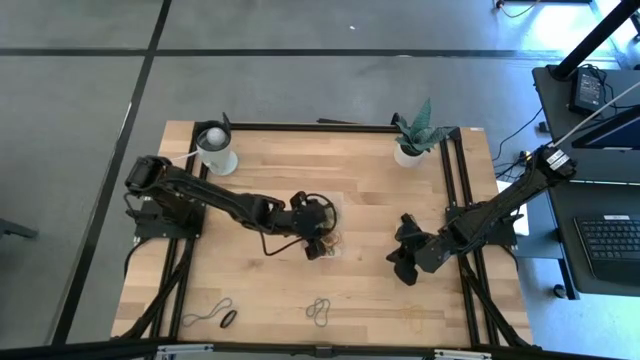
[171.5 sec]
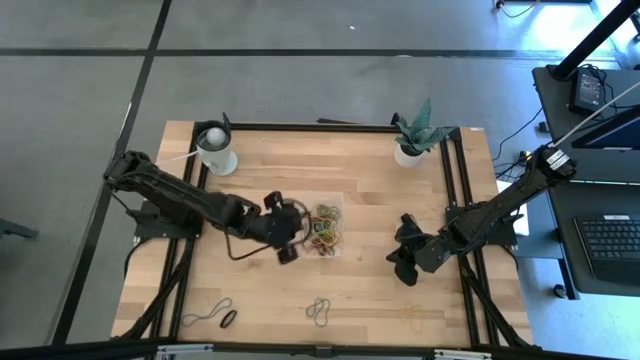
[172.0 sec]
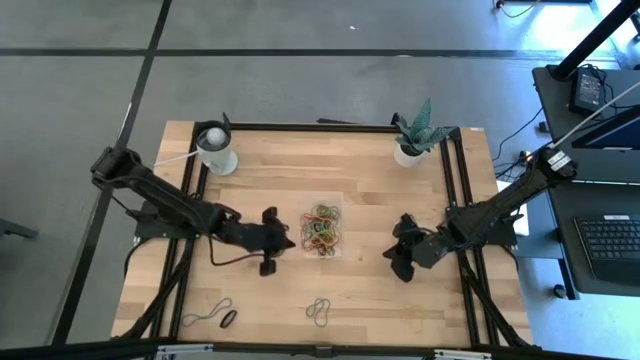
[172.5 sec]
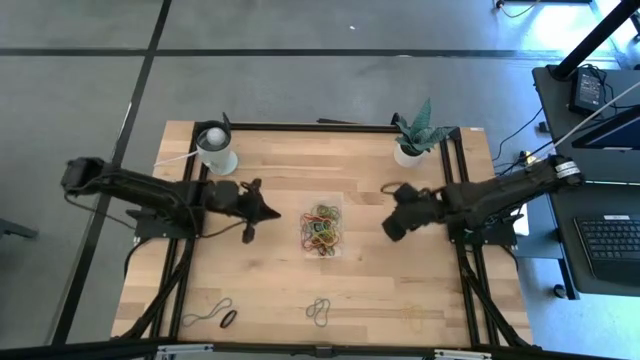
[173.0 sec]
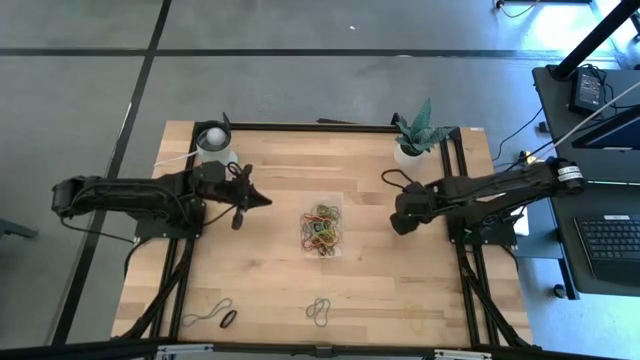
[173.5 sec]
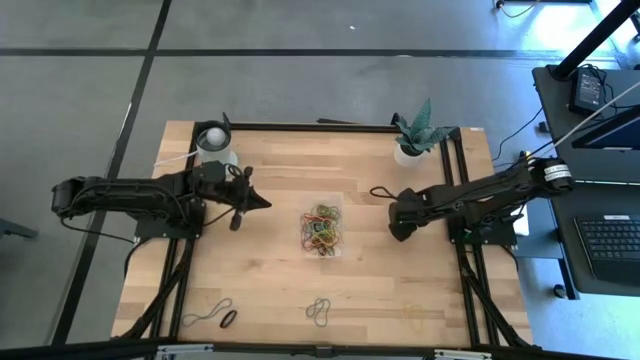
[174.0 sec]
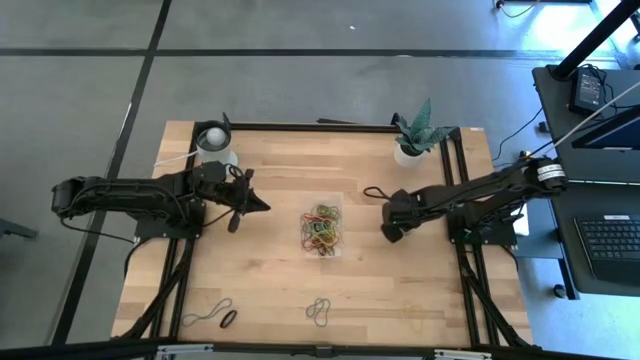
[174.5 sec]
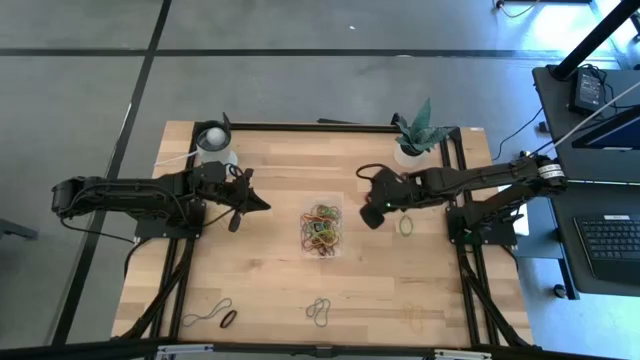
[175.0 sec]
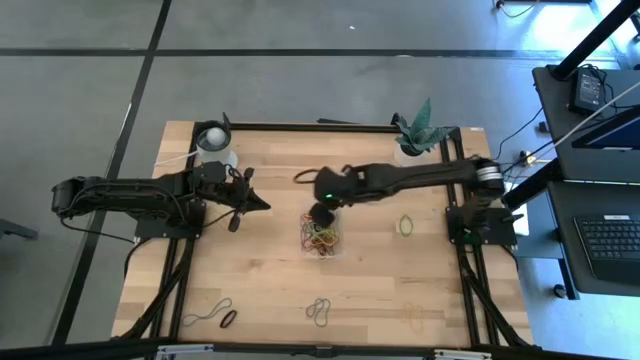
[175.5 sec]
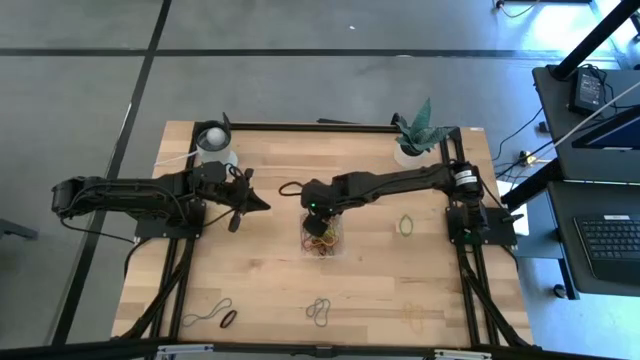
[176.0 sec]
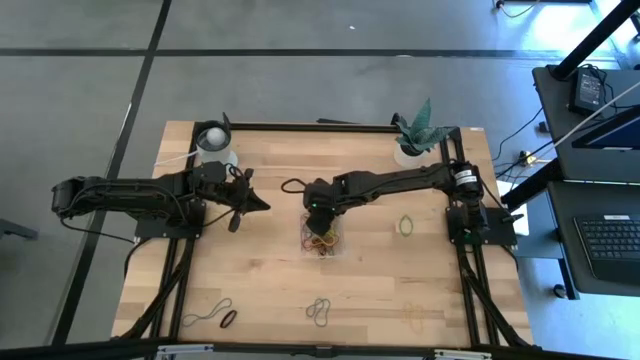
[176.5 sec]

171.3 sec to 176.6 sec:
Task: Pick and place rubber bands into bin
Put the black rubber band into the transparent bin

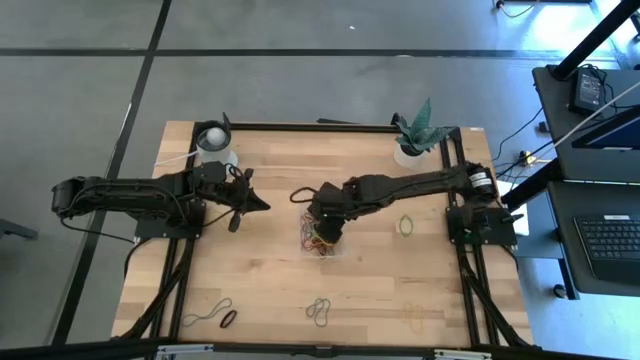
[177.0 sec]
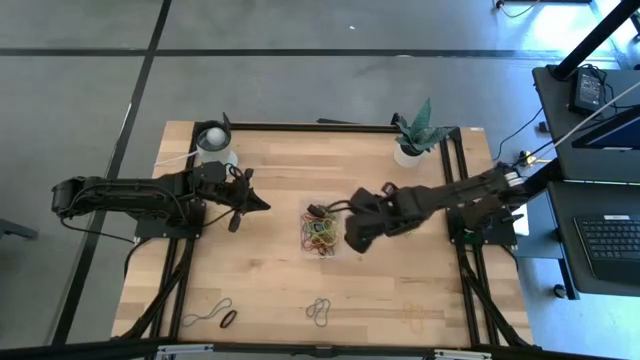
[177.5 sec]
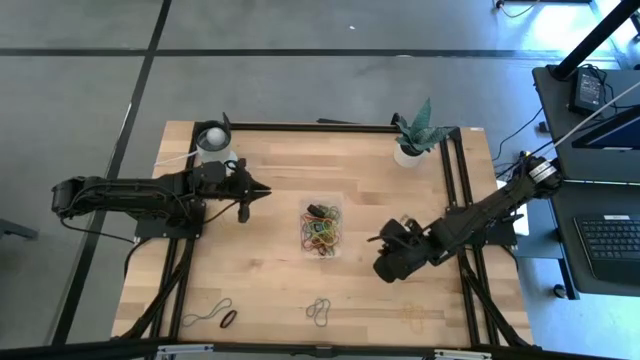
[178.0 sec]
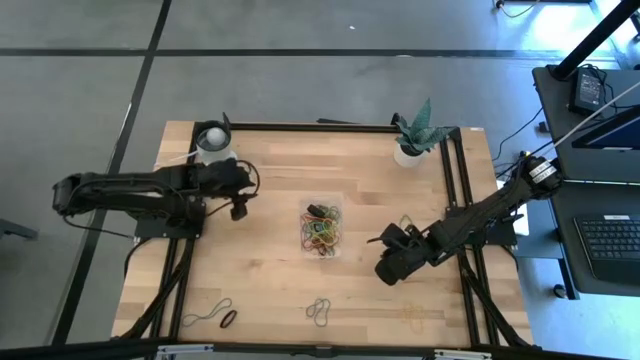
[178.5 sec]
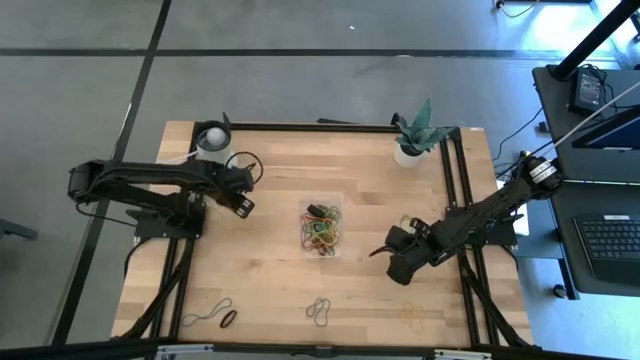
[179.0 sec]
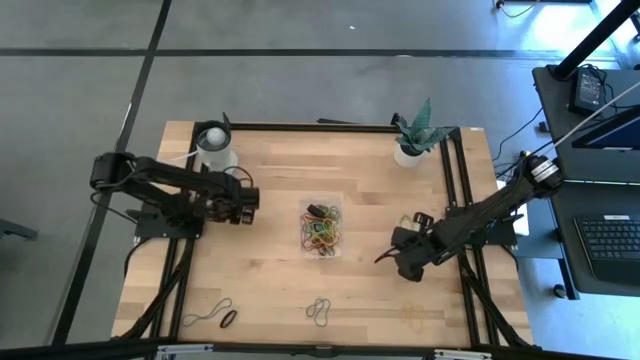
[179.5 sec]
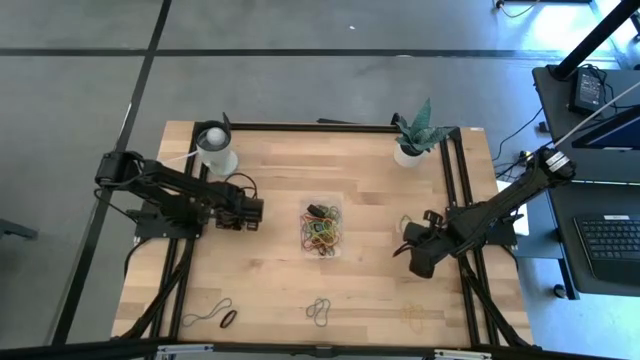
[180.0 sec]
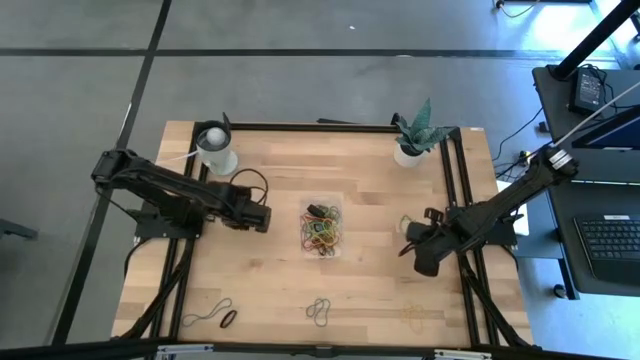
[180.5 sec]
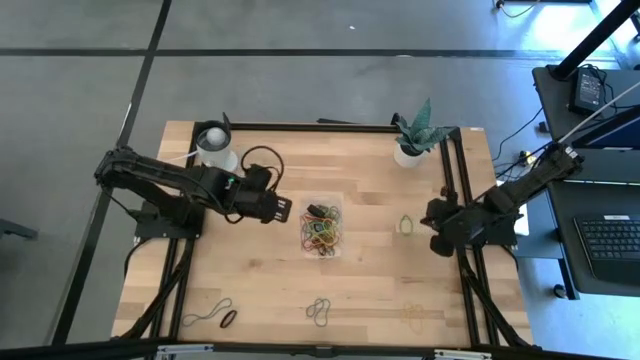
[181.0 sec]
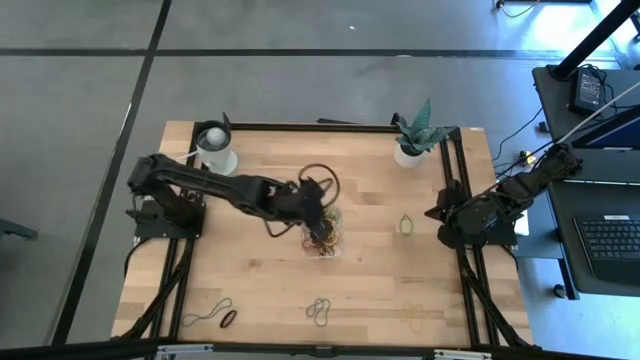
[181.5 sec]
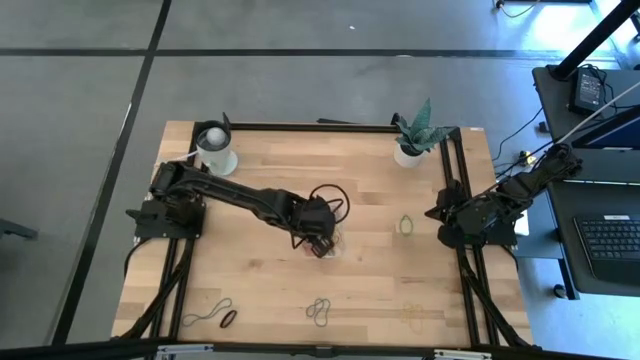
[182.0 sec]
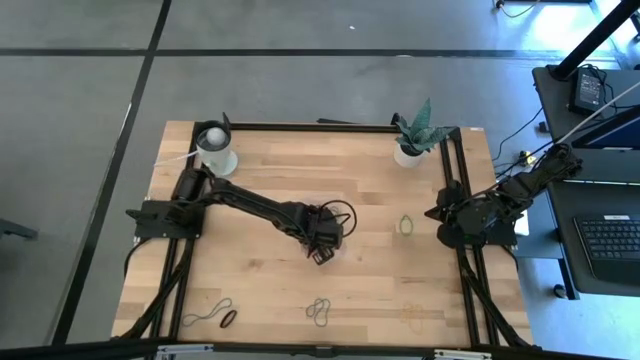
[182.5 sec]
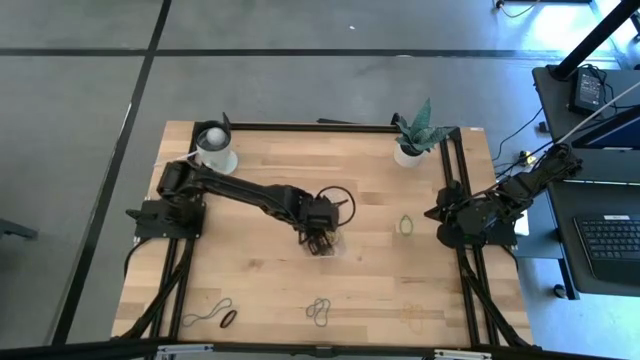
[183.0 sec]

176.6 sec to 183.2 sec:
Put the yellow rubber band into the transparent bin

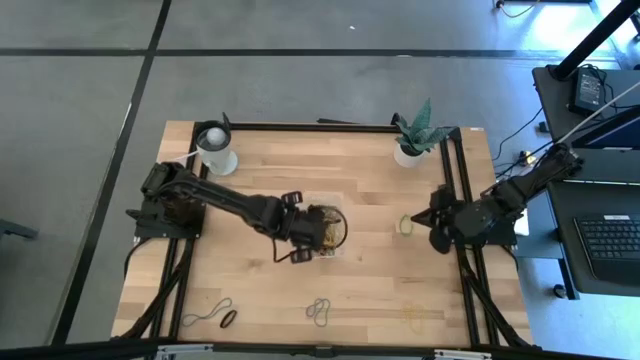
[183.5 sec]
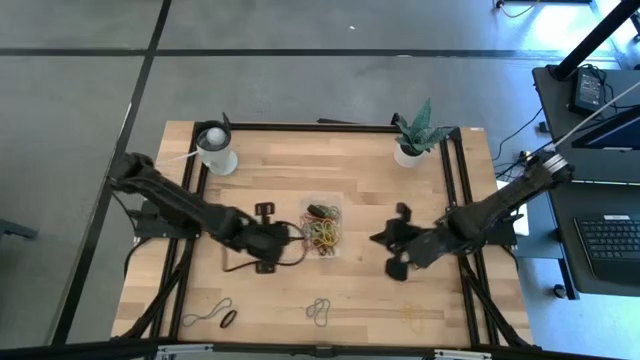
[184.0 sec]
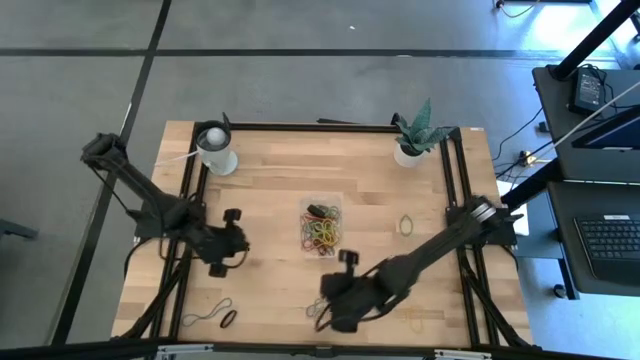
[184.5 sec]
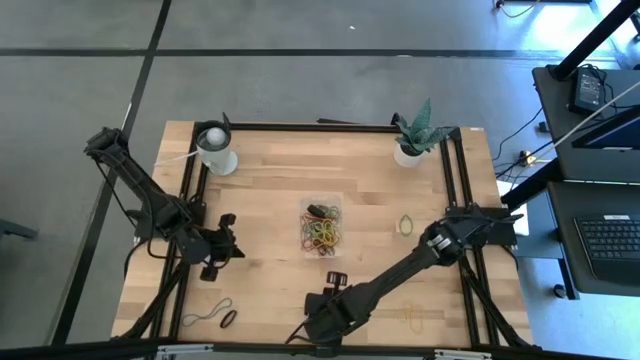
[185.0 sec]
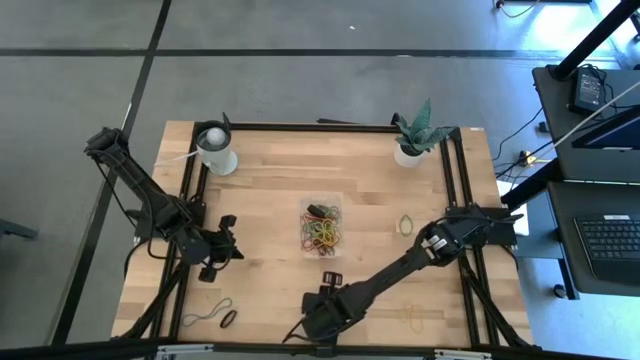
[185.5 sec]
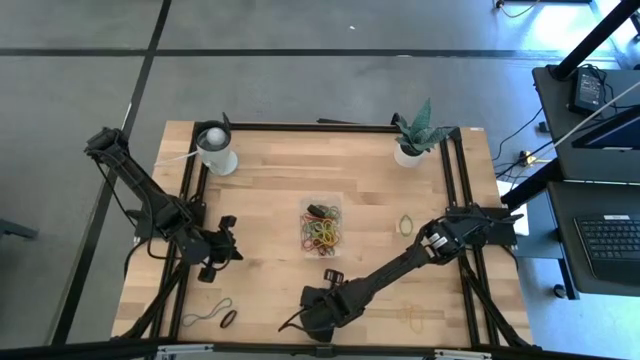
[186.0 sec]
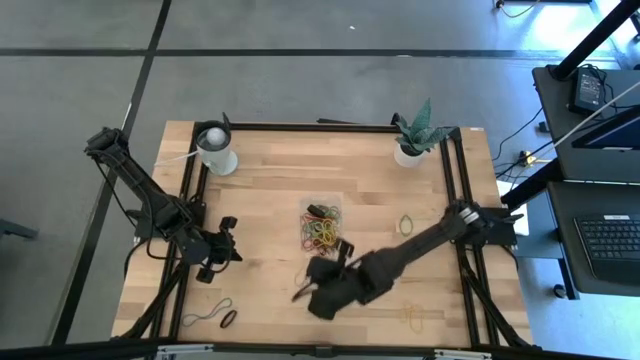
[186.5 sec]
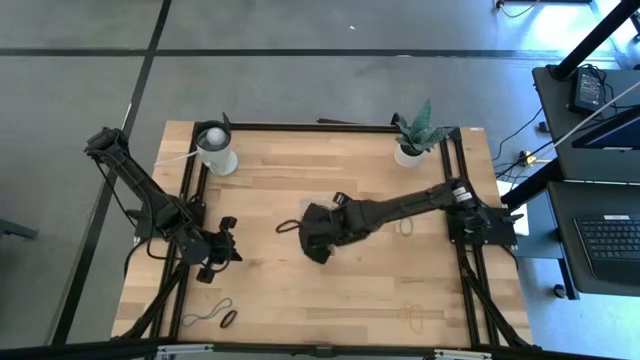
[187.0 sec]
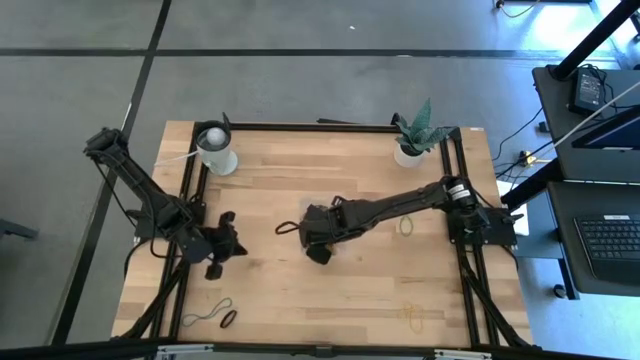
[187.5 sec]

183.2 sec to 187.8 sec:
Put the blue rubber band into the transparent bin

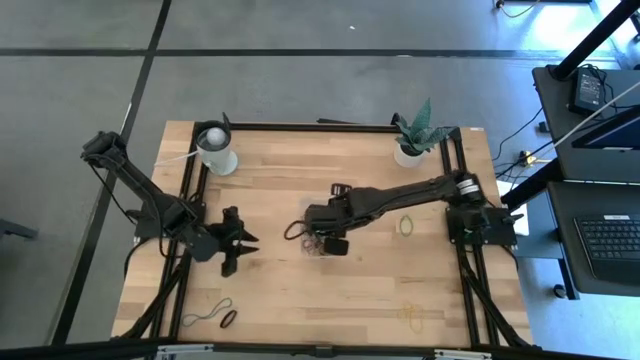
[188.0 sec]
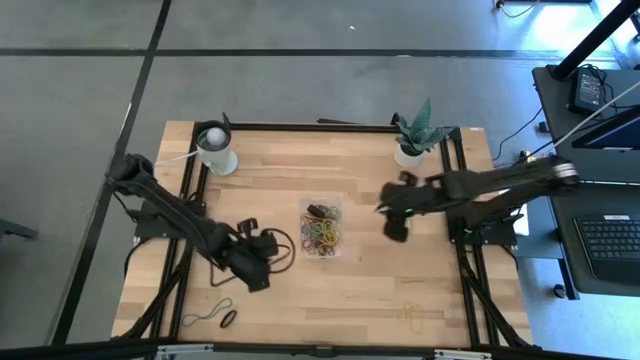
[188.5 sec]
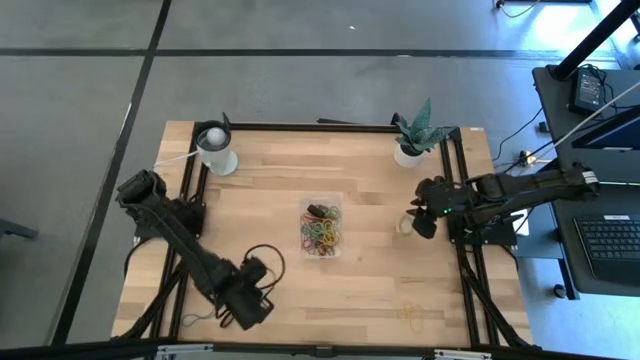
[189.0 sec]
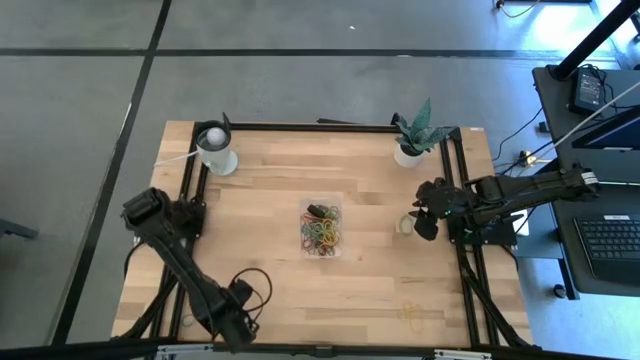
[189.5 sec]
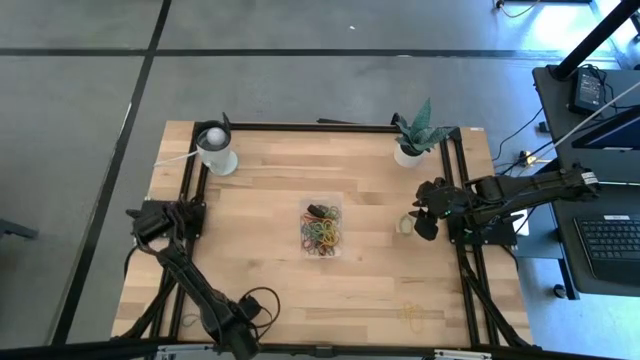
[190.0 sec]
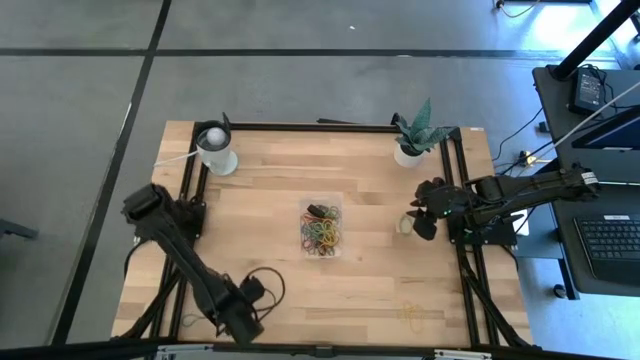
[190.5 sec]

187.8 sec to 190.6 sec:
Put the black rubber band into the transparent bin

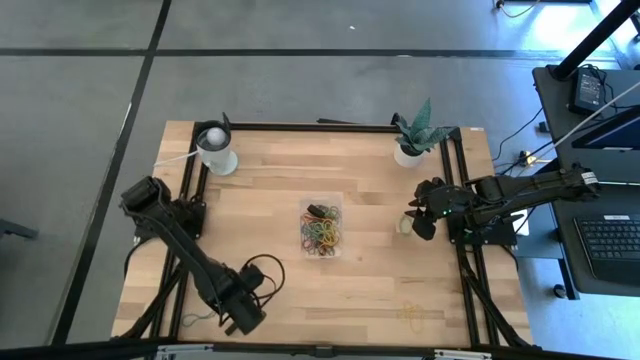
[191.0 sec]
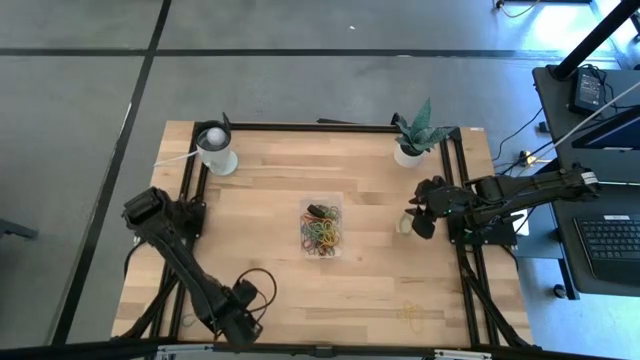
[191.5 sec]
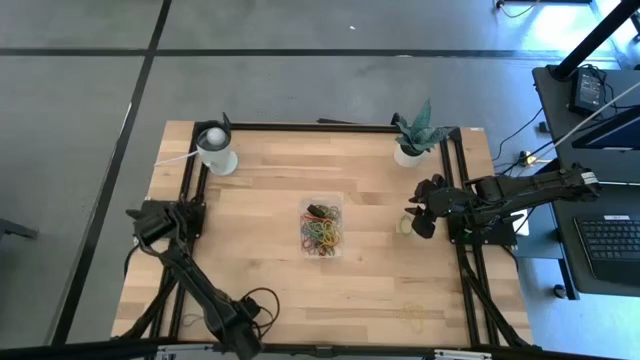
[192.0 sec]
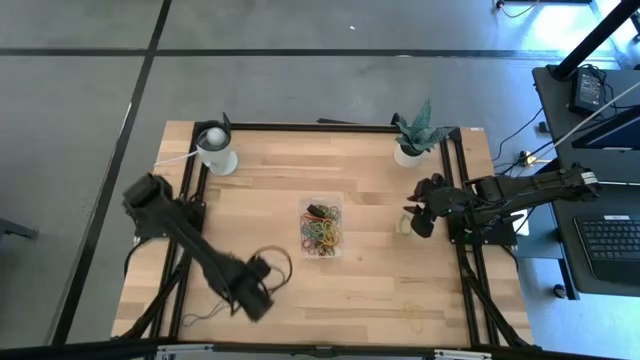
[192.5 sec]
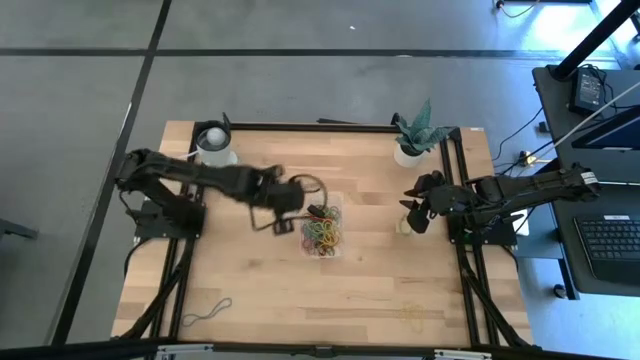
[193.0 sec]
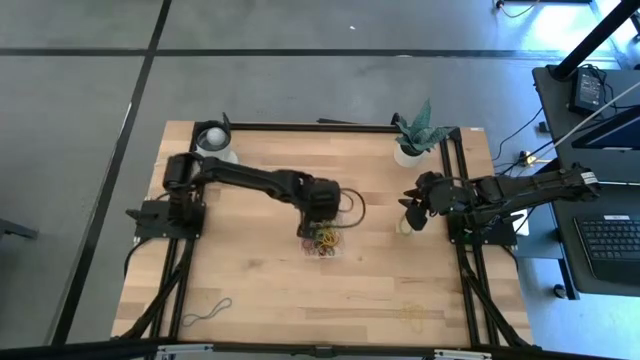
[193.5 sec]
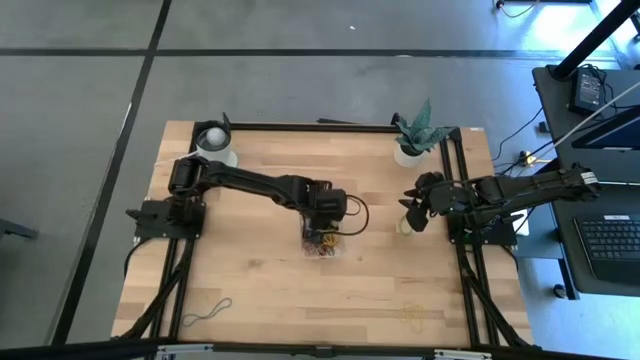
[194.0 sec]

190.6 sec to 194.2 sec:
Put the black rubber band into the transparent bin
